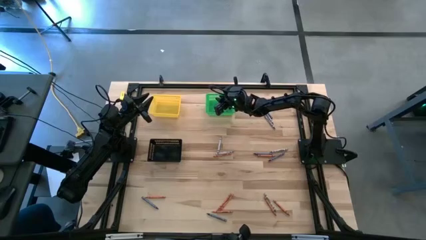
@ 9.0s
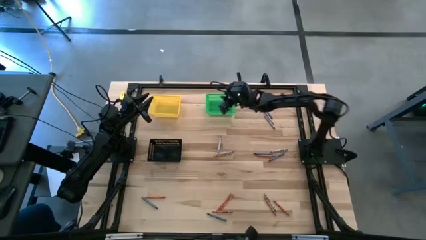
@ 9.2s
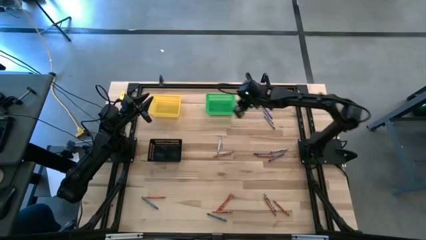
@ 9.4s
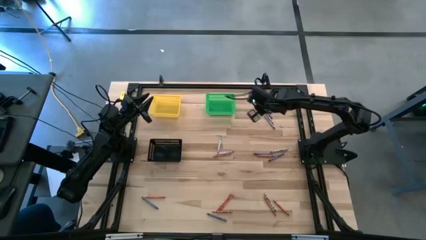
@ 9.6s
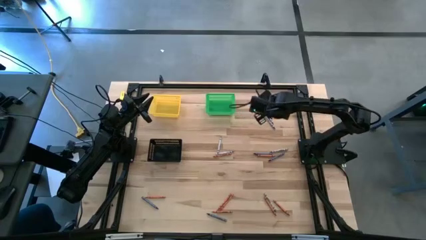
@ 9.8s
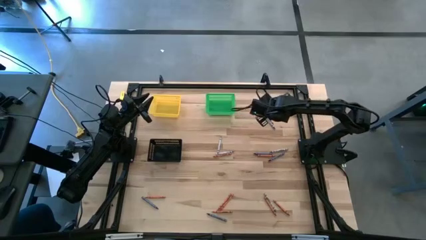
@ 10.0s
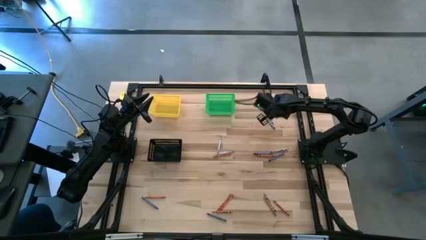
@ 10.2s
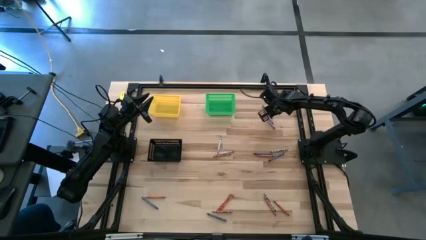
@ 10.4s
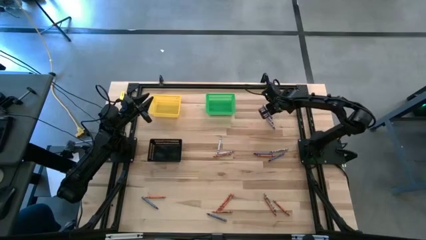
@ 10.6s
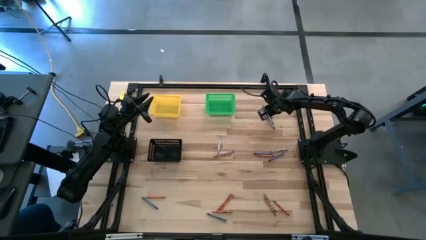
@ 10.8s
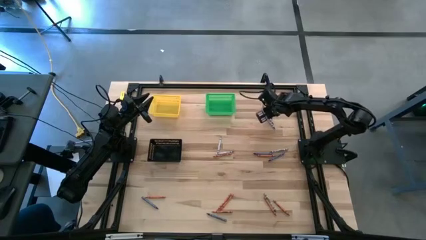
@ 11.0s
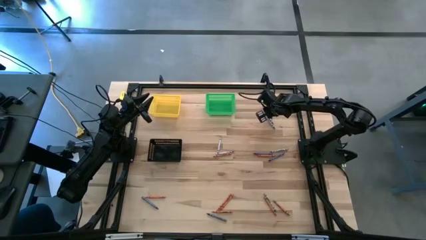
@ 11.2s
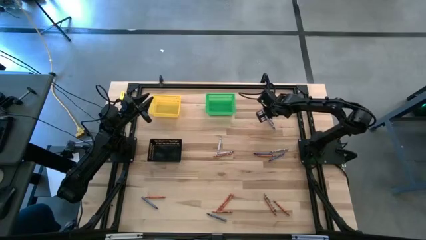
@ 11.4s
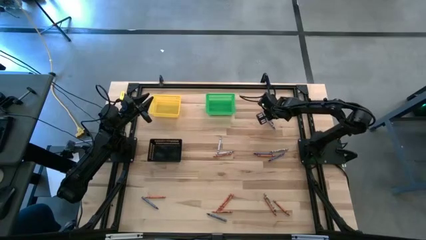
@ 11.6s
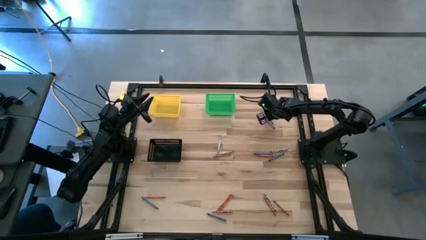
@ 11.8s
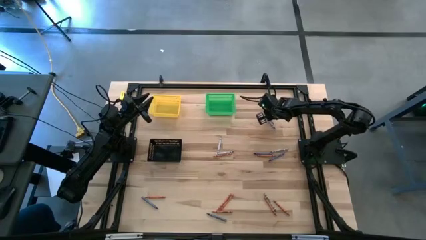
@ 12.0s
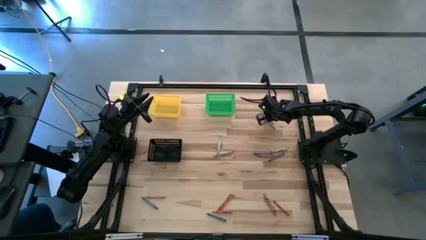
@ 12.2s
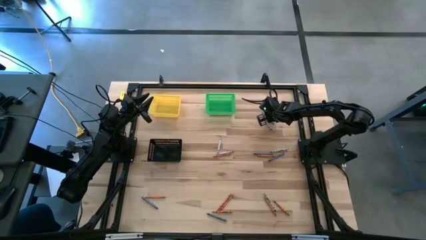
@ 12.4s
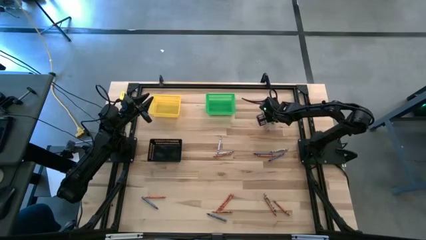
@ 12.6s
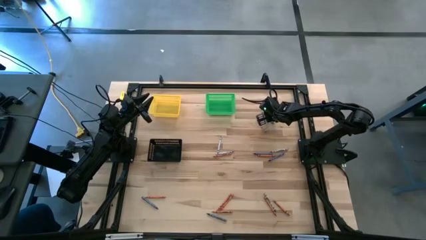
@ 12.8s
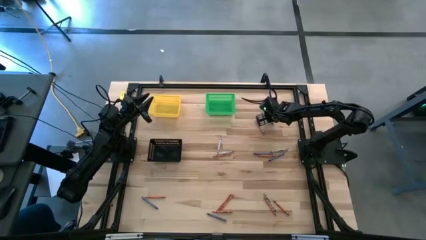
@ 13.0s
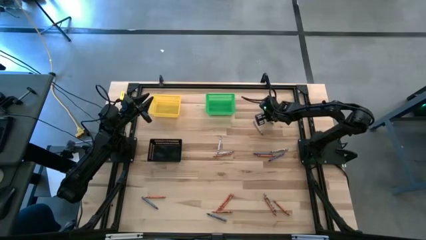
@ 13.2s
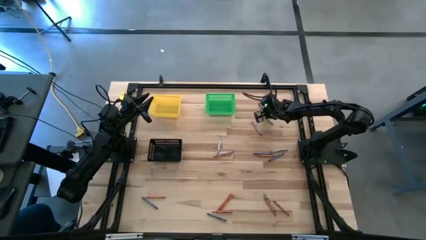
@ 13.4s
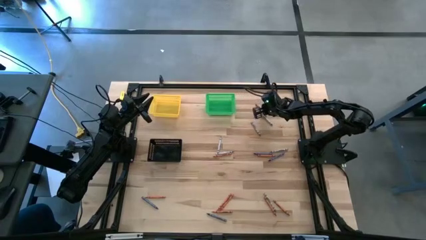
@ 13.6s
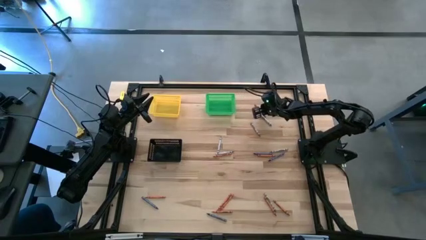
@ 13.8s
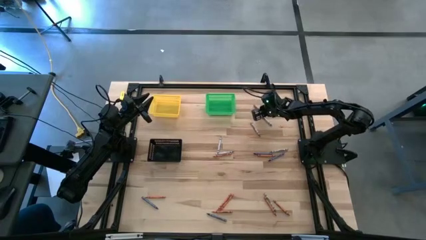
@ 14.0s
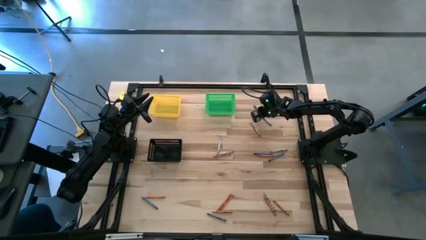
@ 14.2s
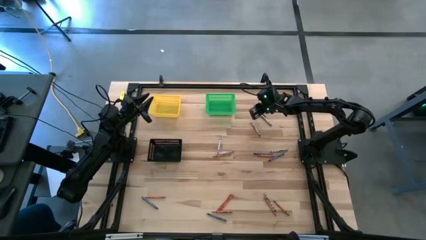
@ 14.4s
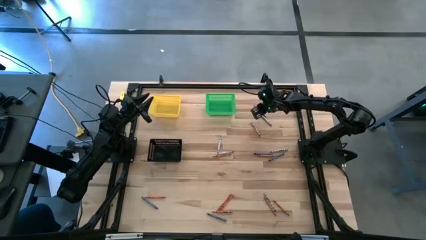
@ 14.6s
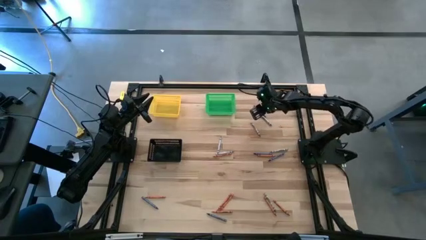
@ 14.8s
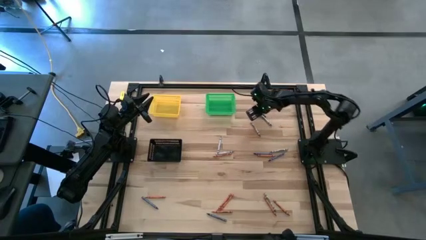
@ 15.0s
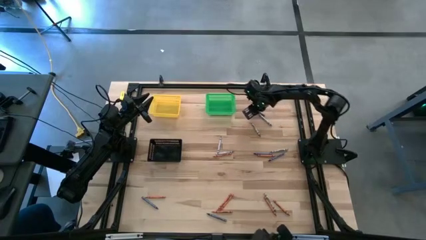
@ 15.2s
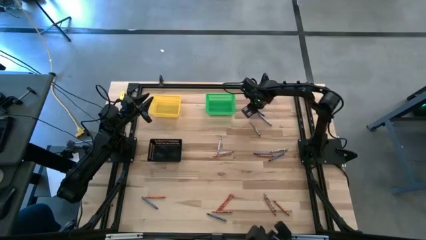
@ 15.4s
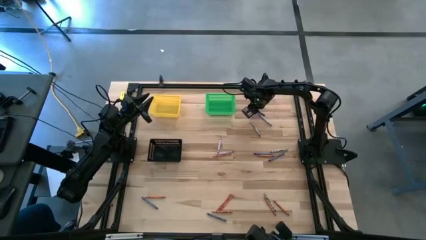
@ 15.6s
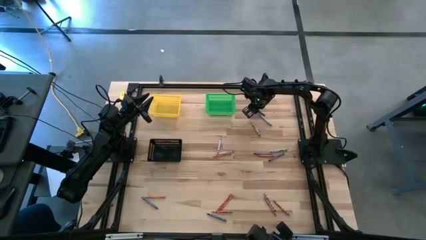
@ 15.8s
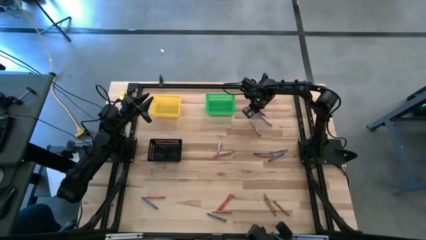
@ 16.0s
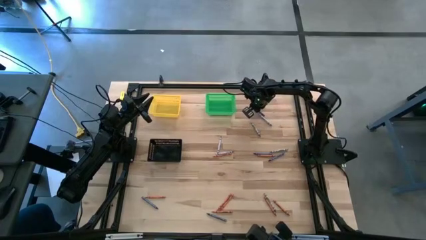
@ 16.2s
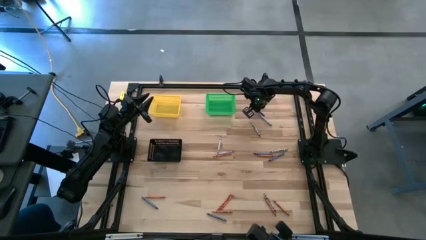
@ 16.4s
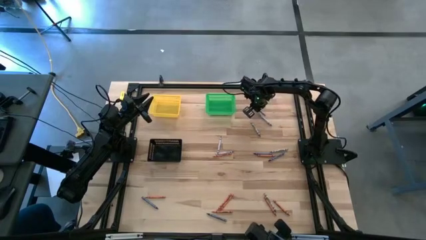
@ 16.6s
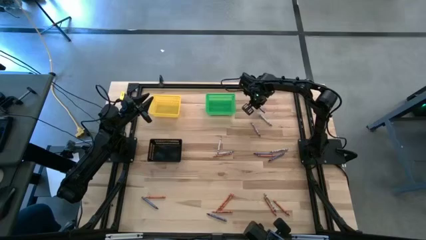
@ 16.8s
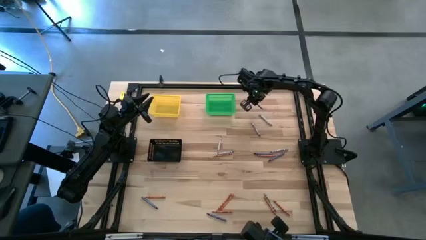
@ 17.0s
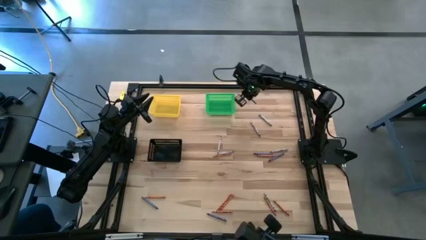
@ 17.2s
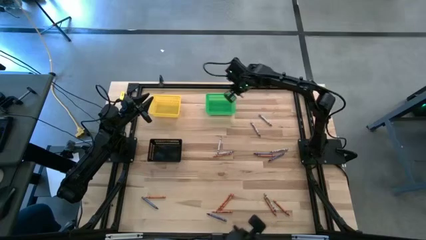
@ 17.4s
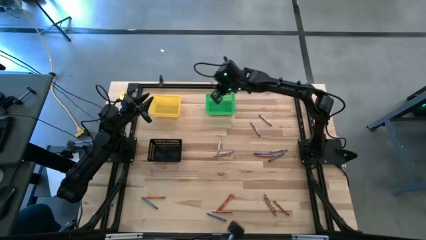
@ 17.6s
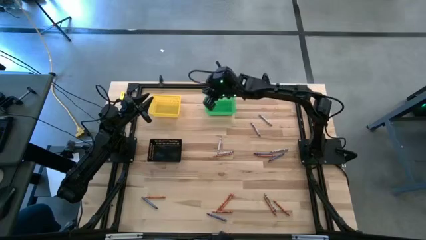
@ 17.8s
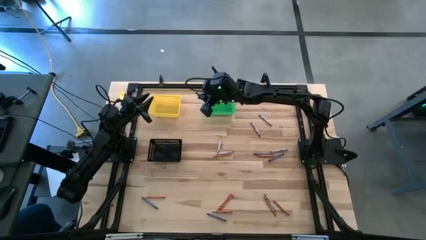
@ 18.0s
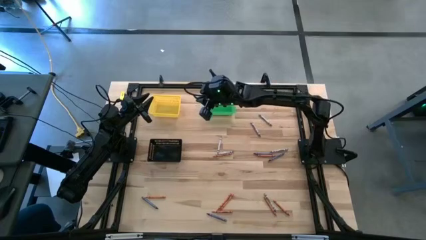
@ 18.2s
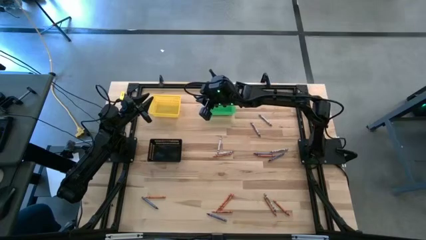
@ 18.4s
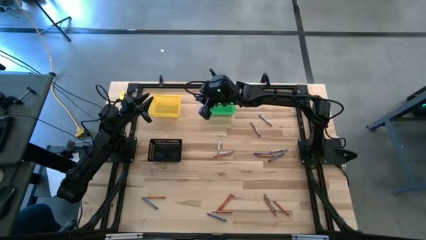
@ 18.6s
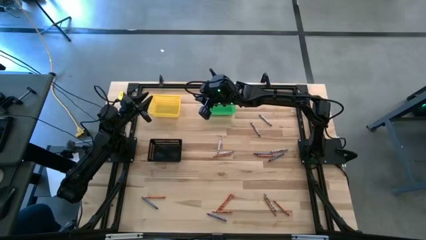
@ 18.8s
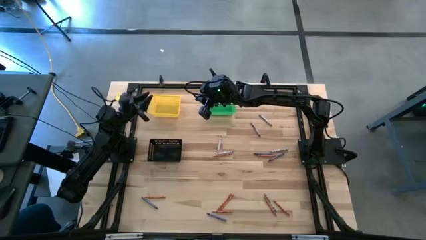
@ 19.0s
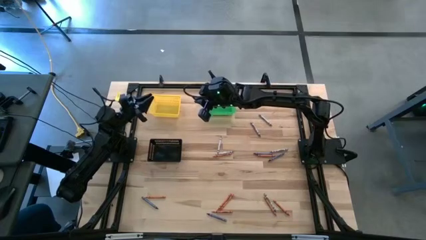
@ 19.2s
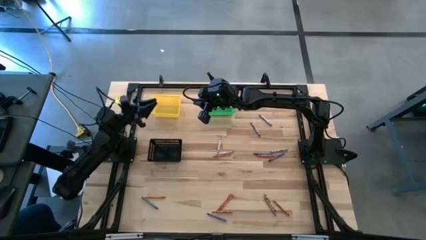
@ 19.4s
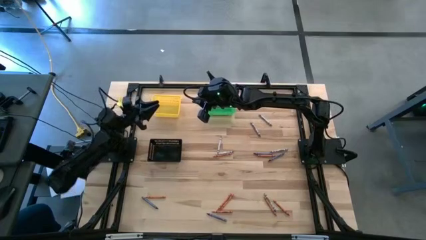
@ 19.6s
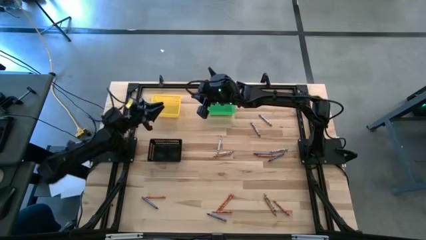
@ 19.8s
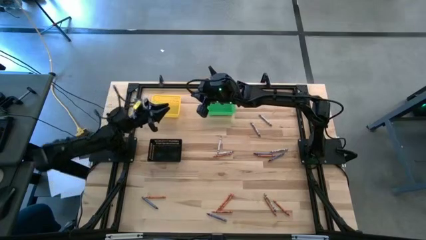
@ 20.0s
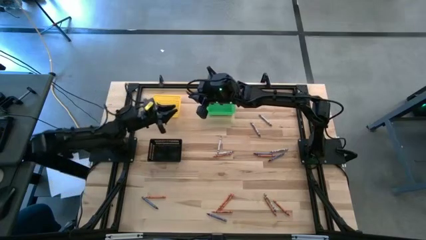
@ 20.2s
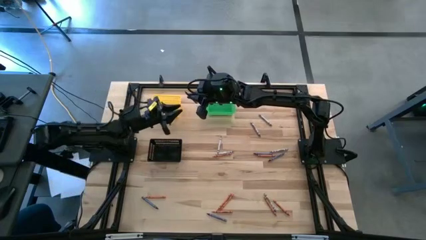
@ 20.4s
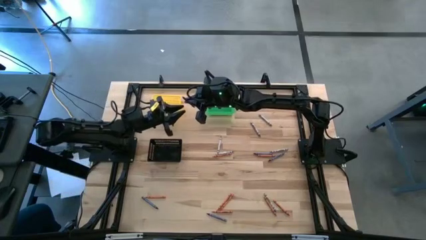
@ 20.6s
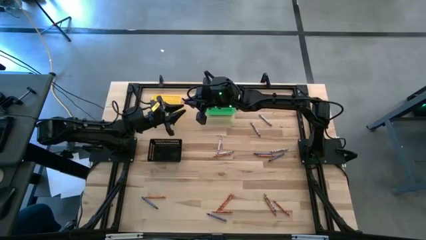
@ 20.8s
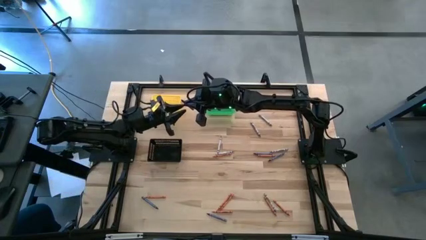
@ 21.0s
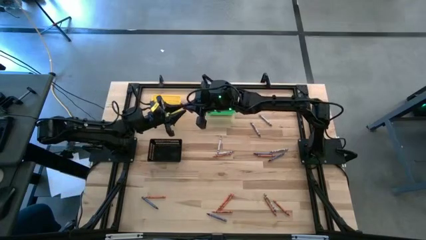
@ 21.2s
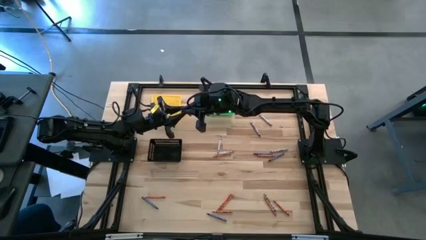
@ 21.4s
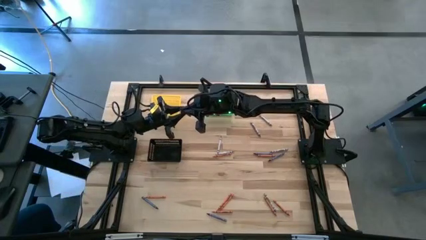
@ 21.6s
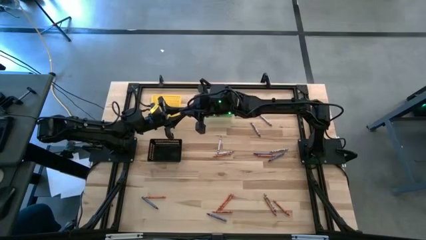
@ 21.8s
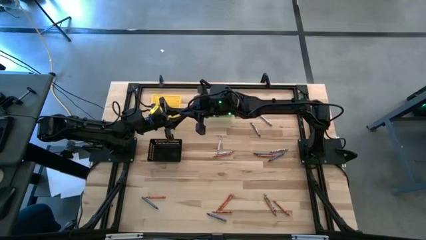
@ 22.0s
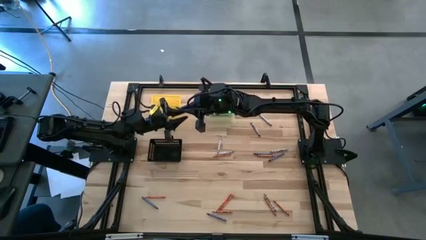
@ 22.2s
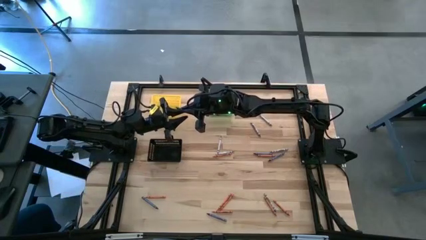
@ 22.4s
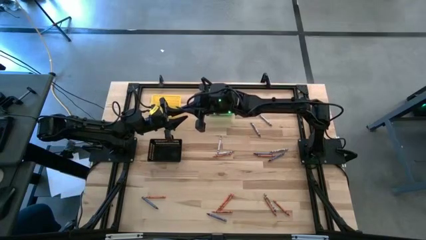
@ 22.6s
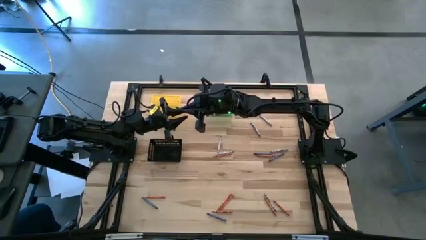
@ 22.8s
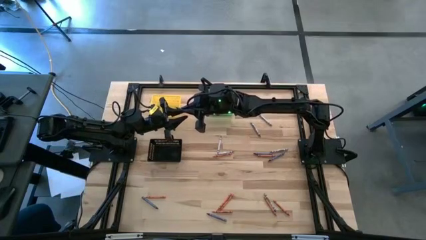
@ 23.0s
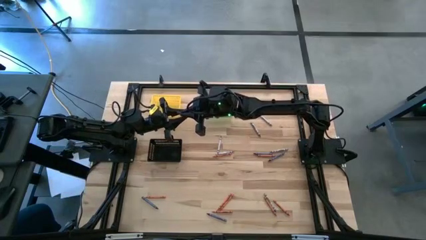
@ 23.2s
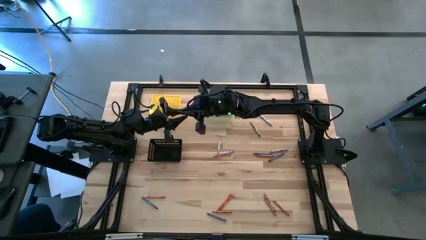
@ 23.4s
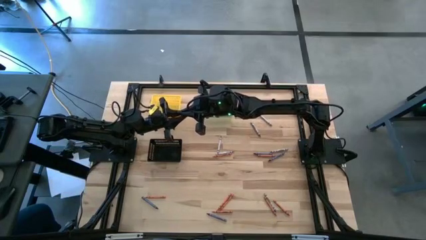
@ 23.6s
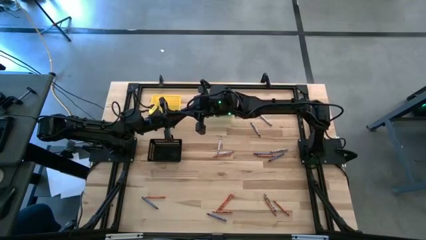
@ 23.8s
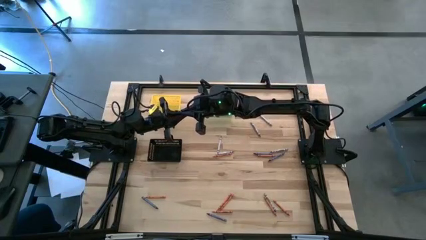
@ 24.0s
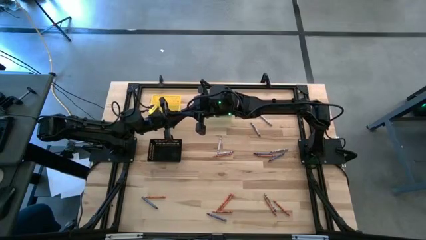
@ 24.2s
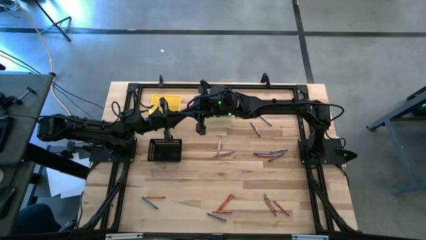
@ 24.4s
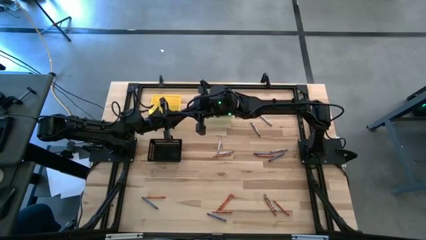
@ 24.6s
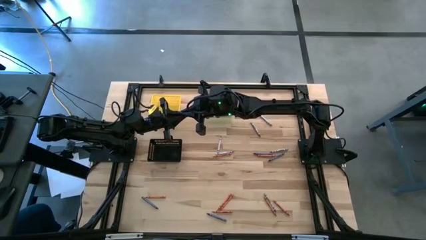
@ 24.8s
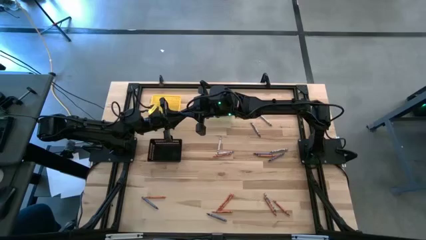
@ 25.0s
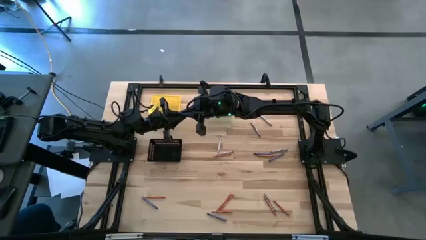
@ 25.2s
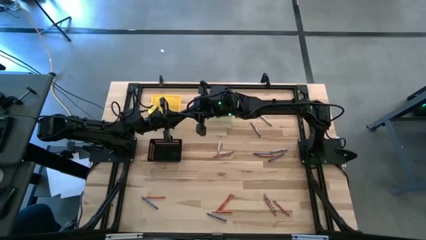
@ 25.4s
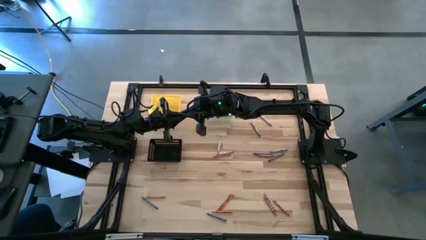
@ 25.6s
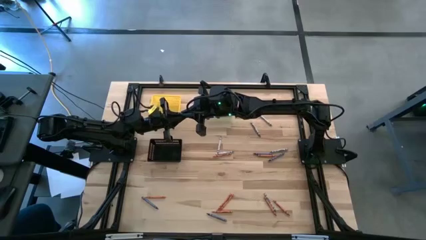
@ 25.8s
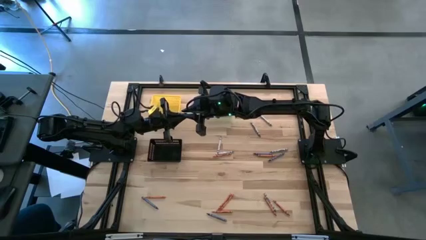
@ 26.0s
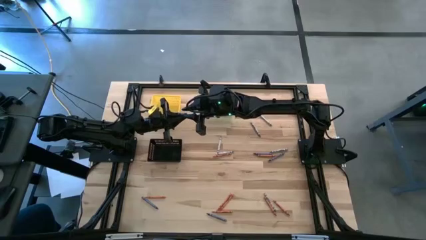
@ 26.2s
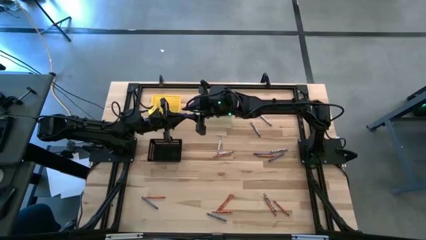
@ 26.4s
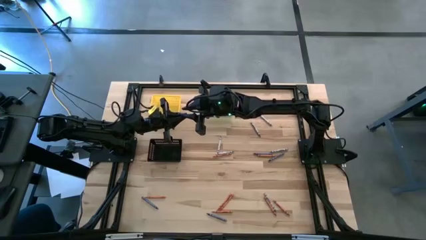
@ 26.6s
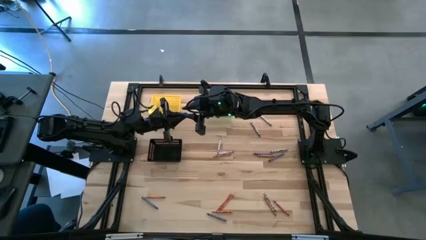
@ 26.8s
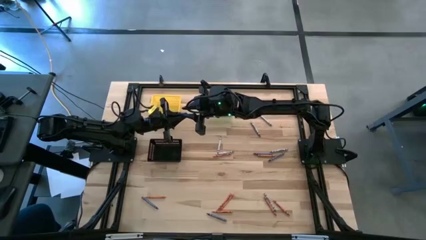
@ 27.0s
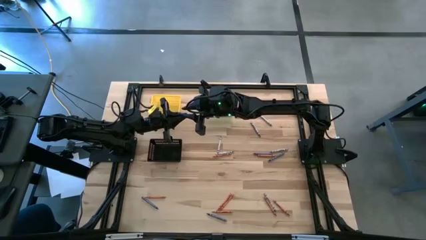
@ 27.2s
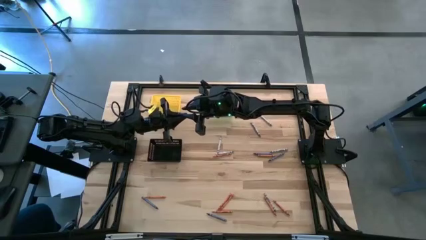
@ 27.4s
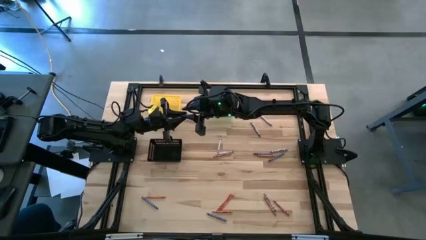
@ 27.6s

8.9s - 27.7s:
Task: Sort crayons
Put the blue crayon into the yellow bin
